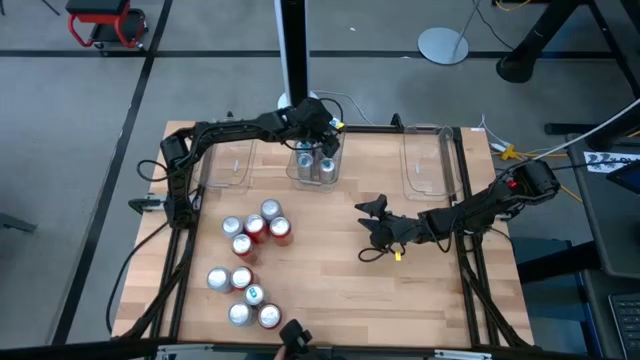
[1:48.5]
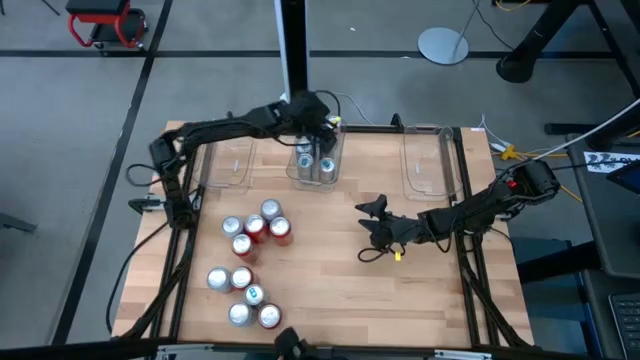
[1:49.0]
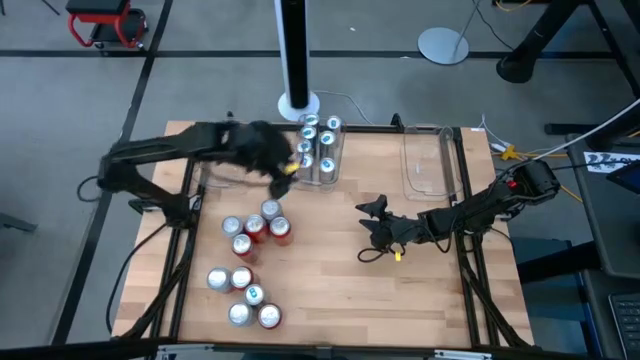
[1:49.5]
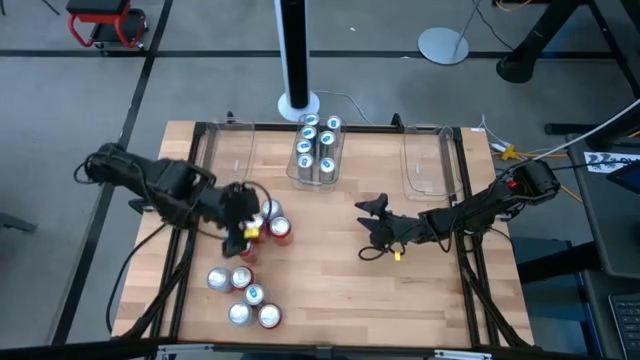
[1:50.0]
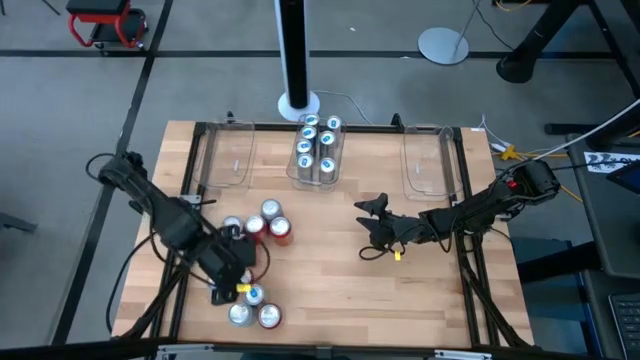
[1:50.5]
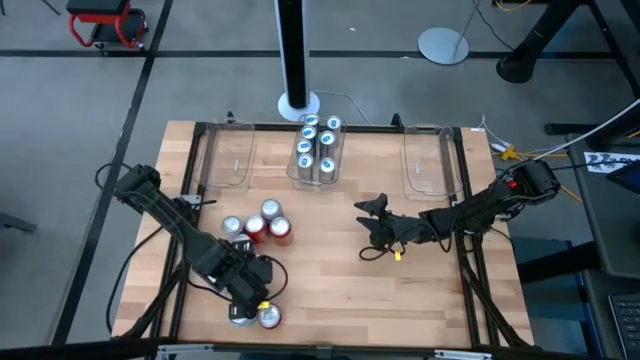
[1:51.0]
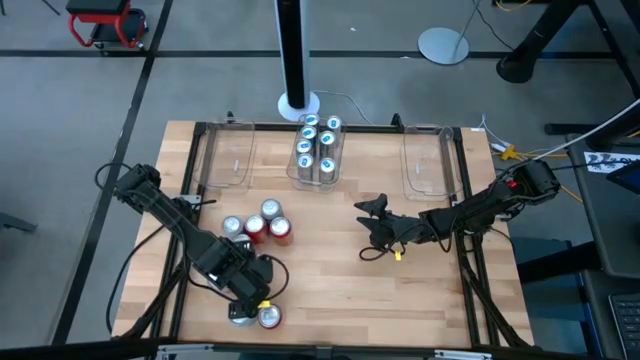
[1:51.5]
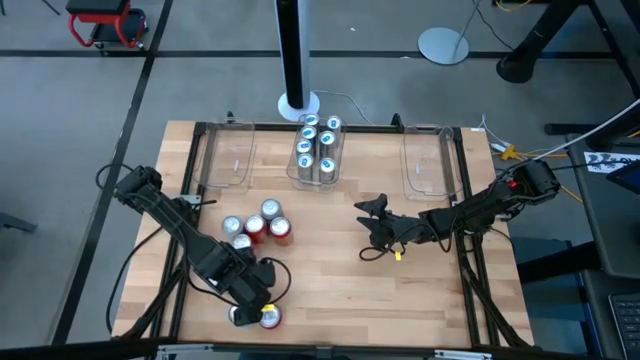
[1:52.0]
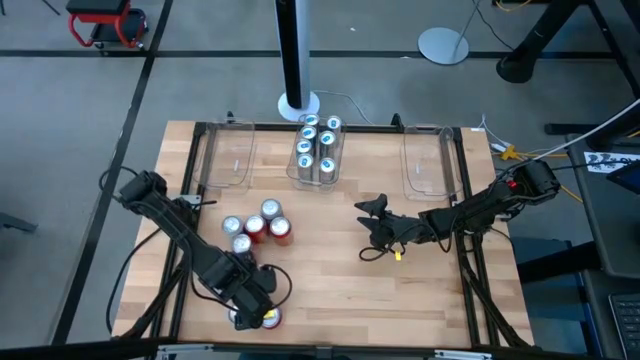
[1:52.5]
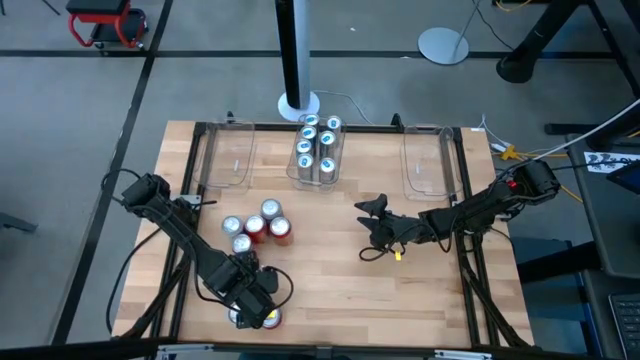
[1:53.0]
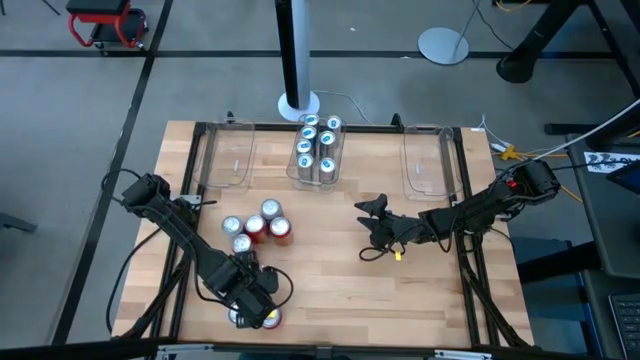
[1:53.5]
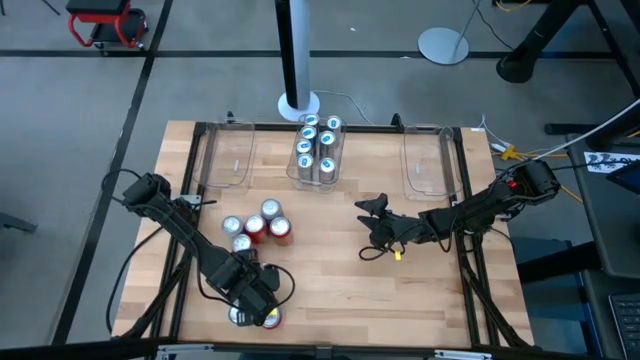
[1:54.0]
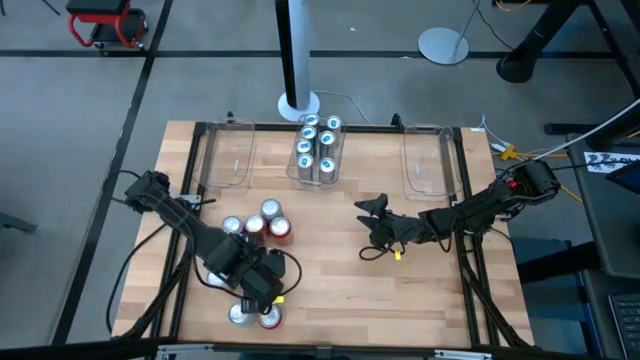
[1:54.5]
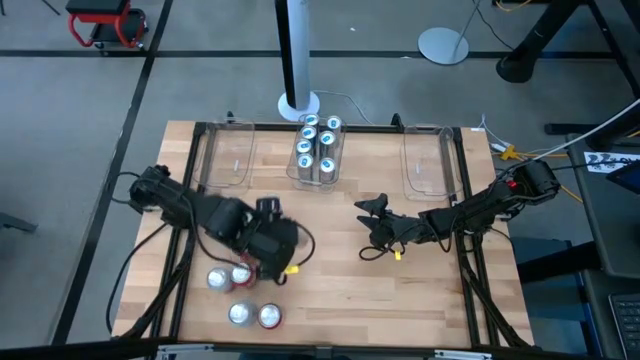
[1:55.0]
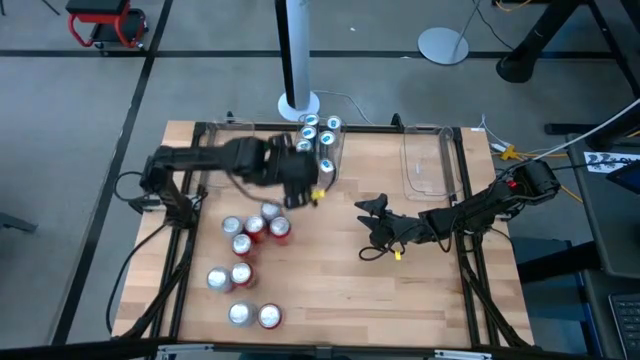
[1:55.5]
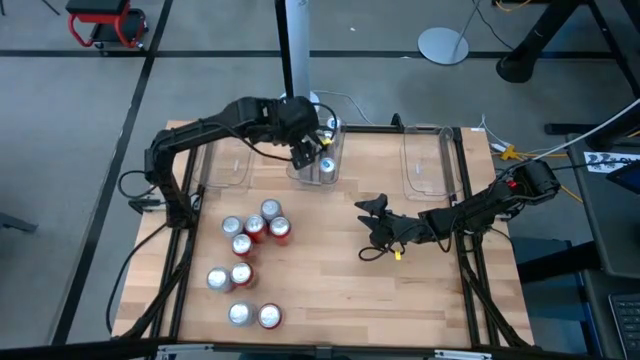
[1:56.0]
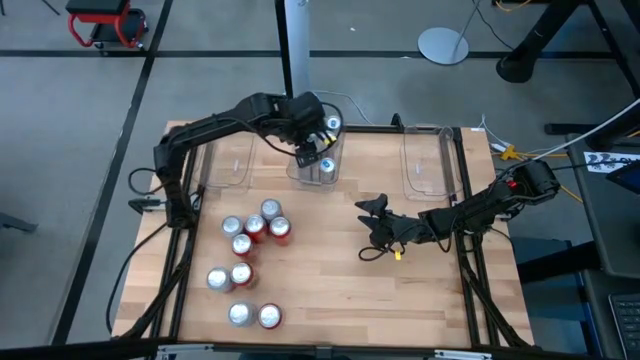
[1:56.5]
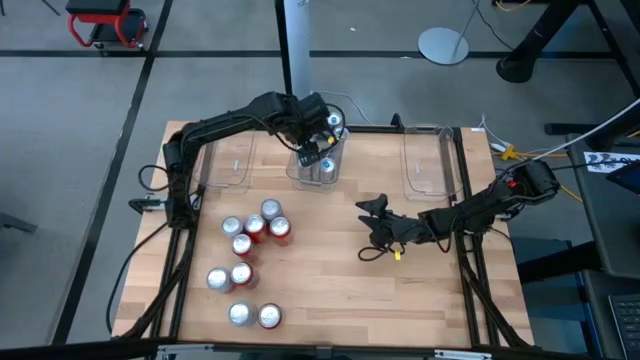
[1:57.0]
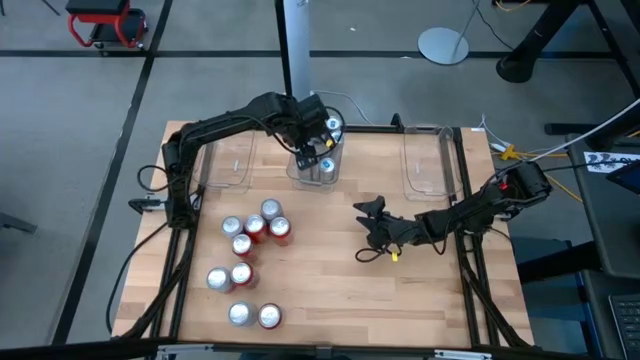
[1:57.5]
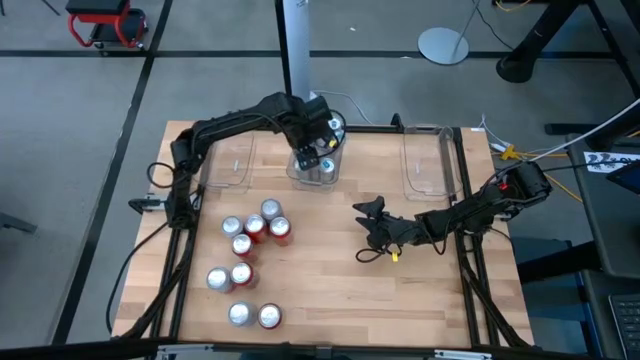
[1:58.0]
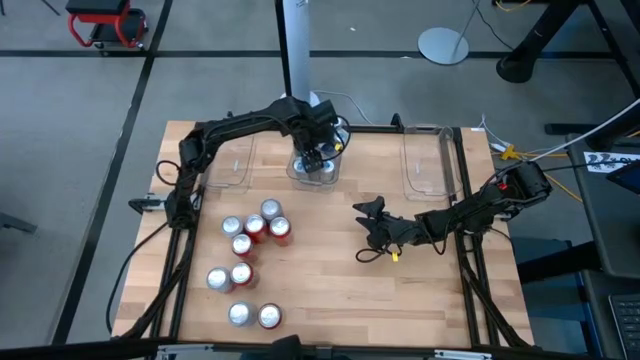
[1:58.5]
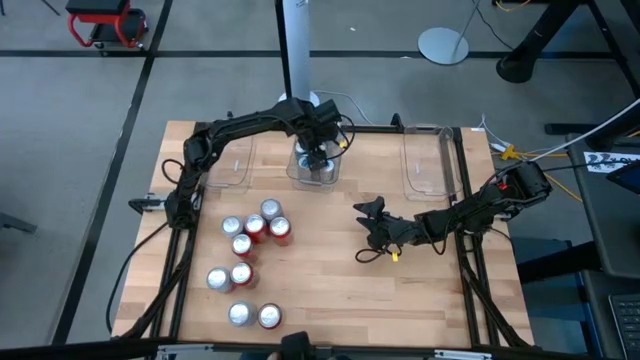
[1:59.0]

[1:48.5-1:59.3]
Task: Sort soda cans
Put the blue soda can into the middle transparent bin

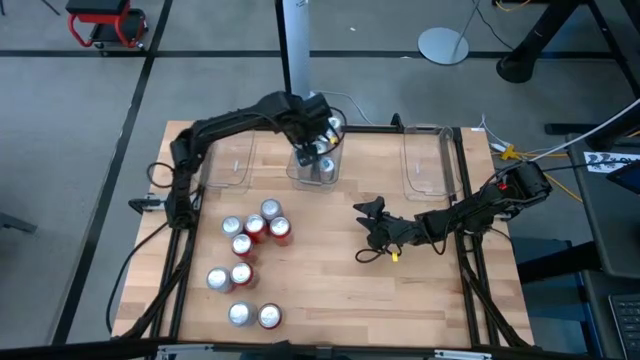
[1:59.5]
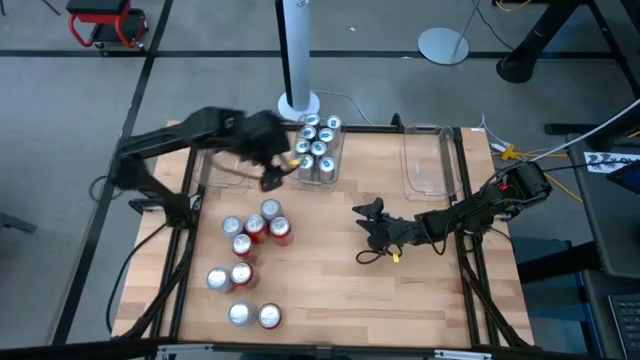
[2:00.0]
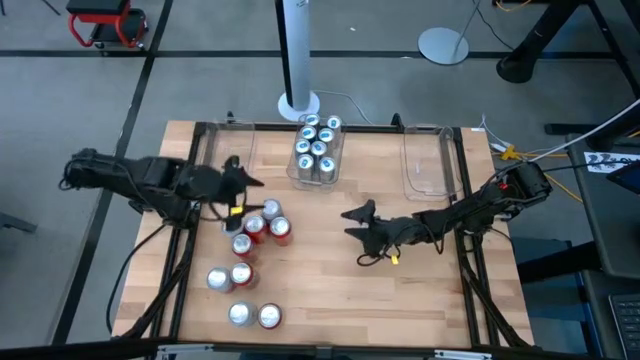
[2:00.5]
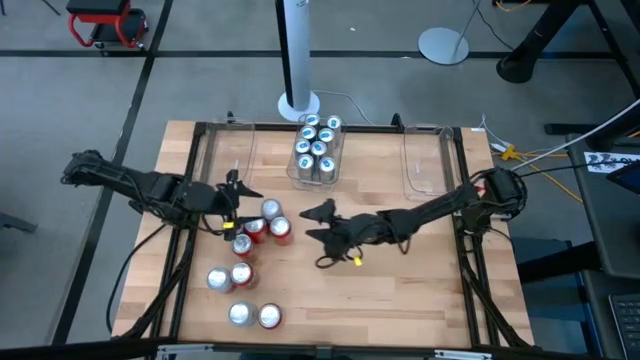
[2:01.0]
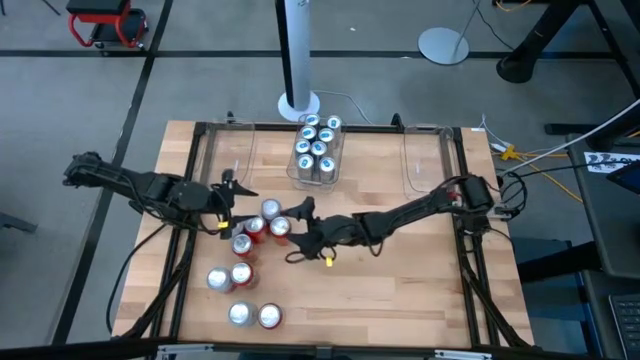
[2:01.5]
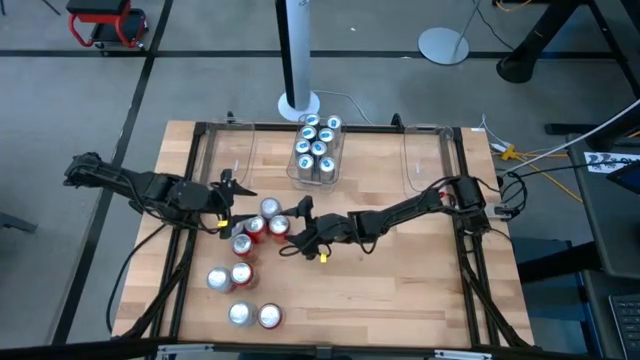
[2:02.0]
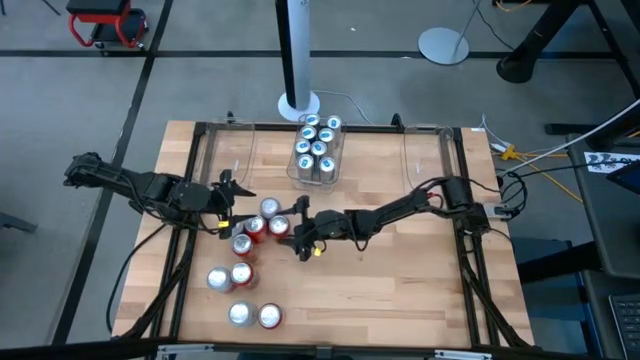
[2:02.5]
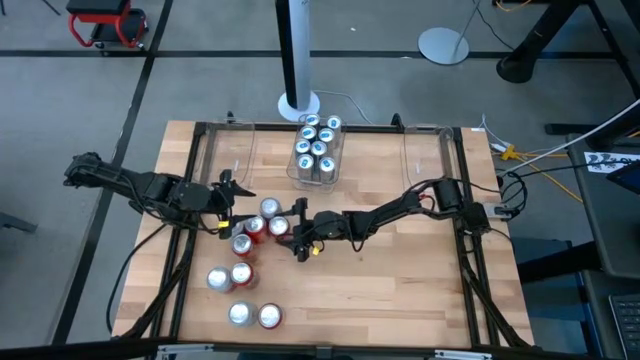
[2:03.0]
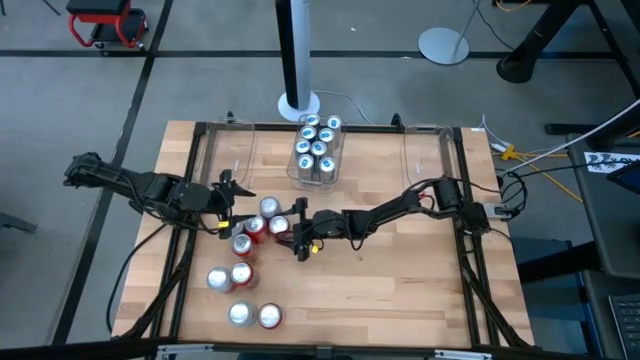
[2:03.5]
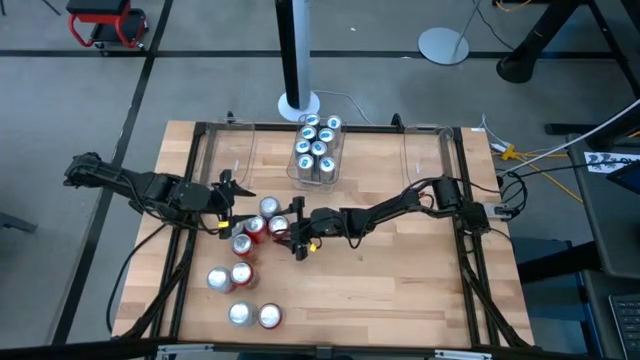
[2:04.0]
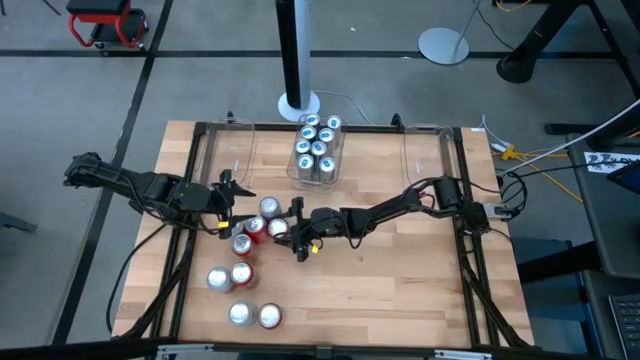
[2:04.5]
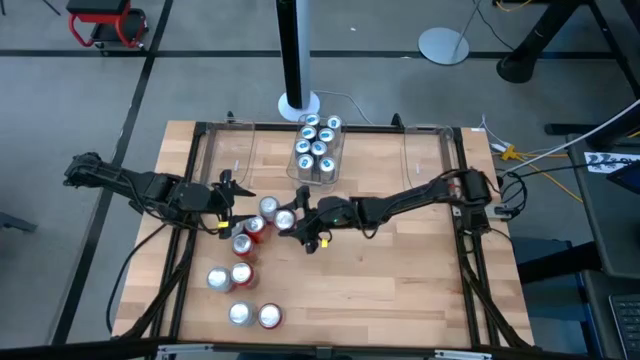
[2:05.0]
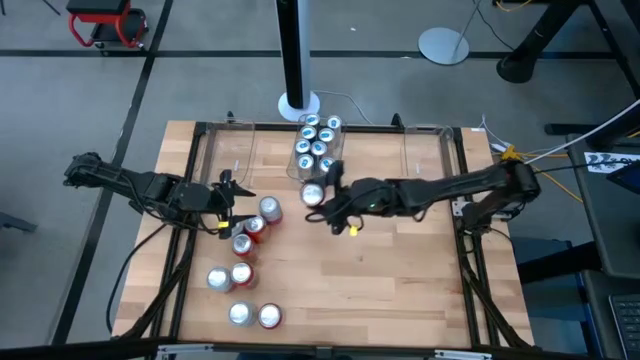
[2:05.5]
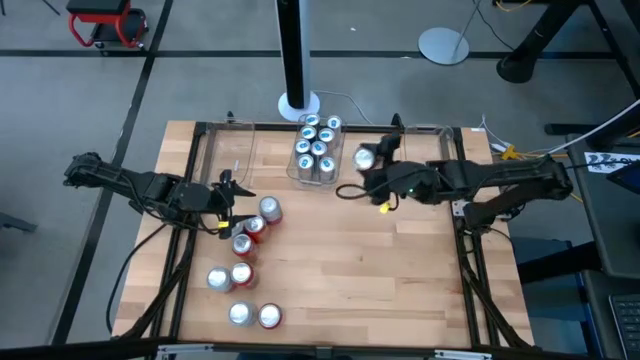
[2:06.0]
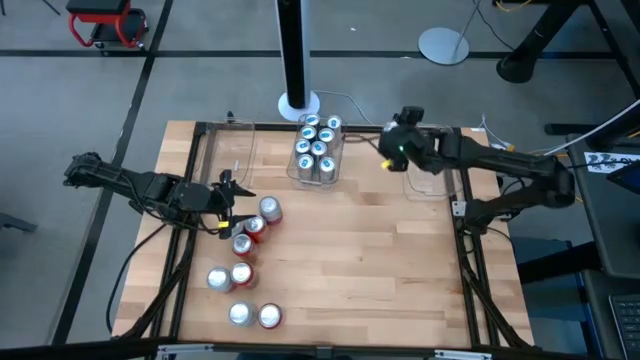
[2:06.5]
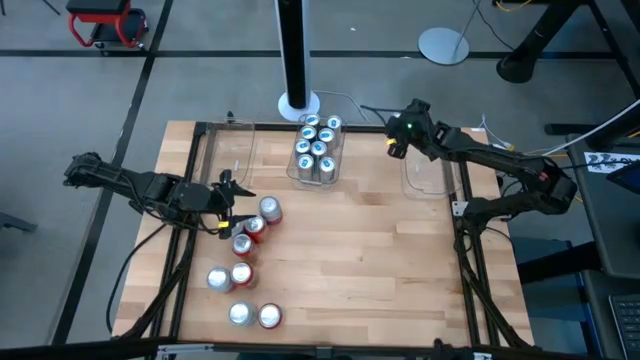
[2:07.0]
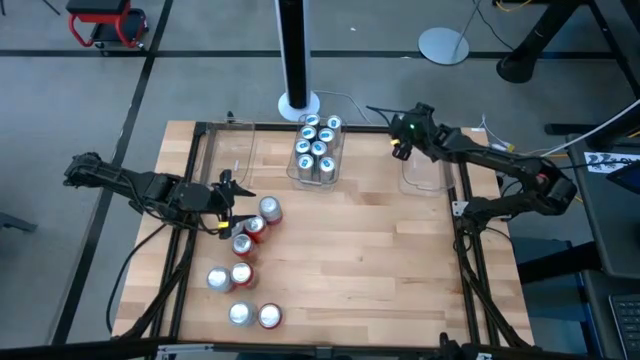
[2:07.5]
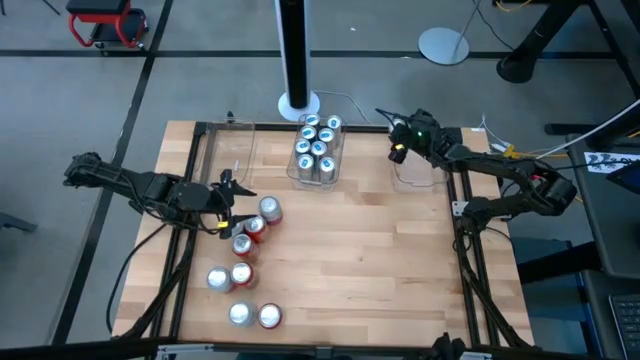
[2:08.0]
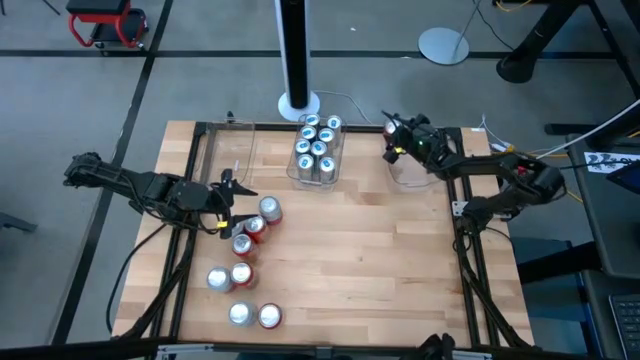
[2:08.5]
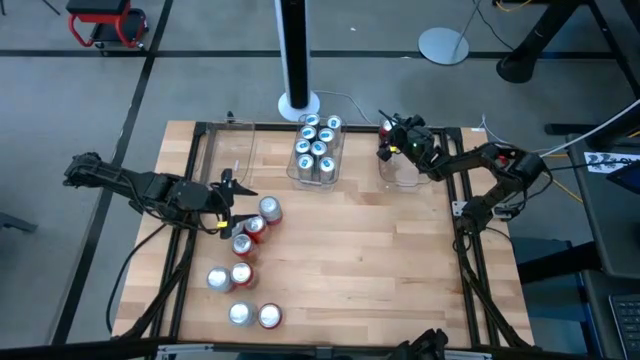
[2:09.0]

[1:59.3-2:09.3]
Put the orange soda can into the right transparent bin
